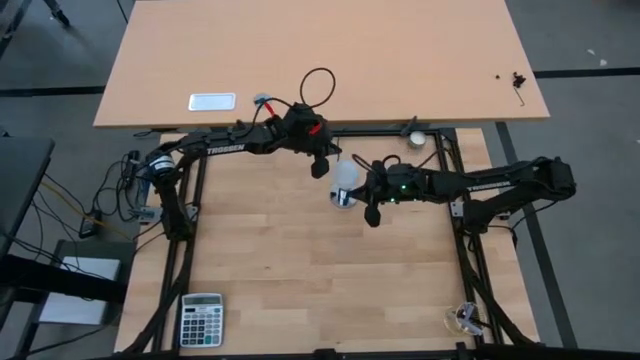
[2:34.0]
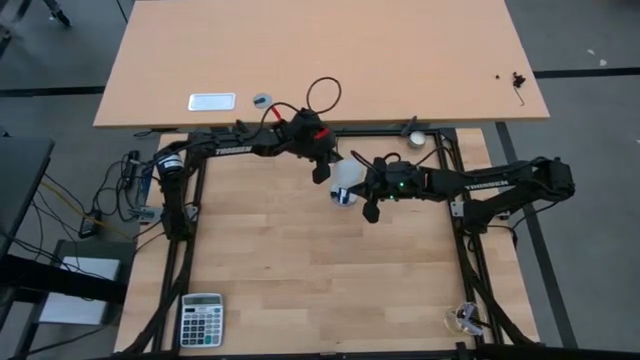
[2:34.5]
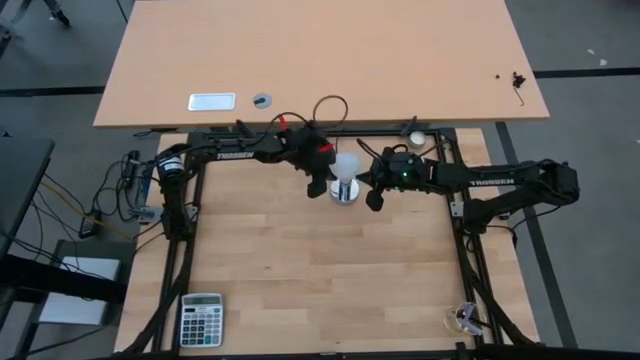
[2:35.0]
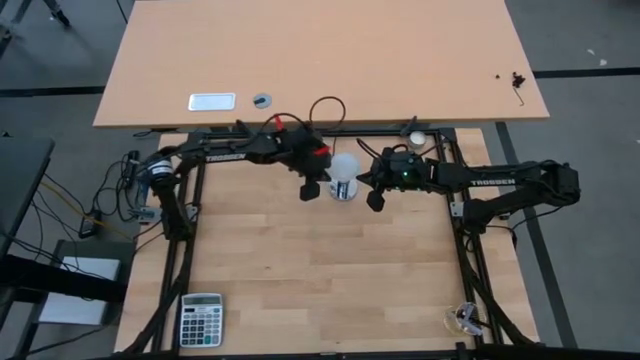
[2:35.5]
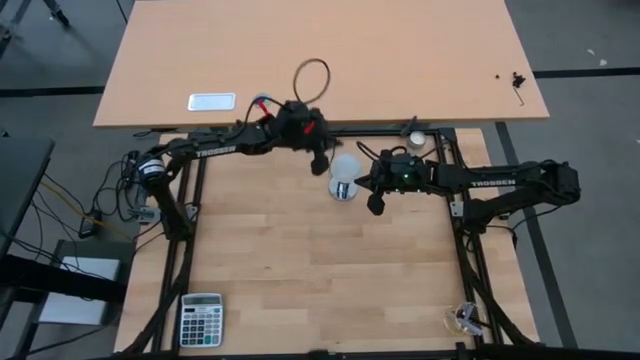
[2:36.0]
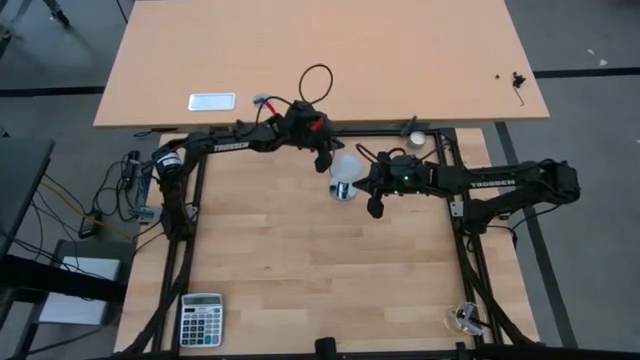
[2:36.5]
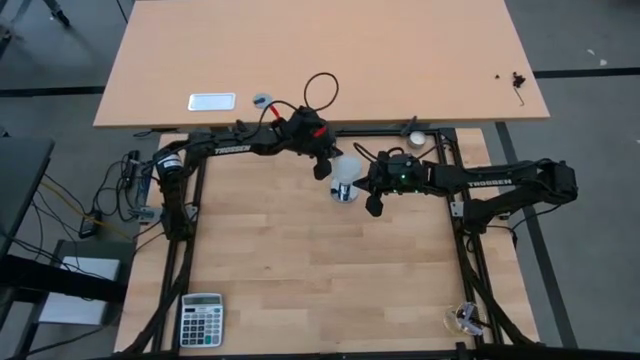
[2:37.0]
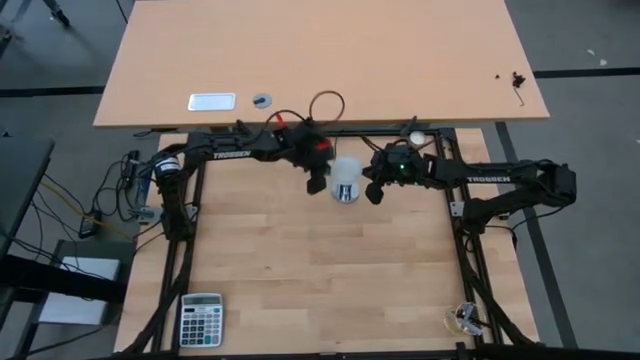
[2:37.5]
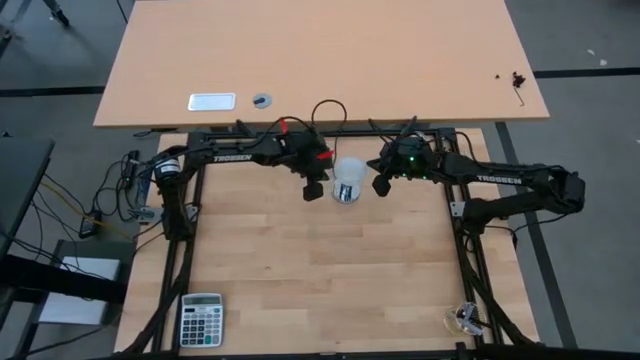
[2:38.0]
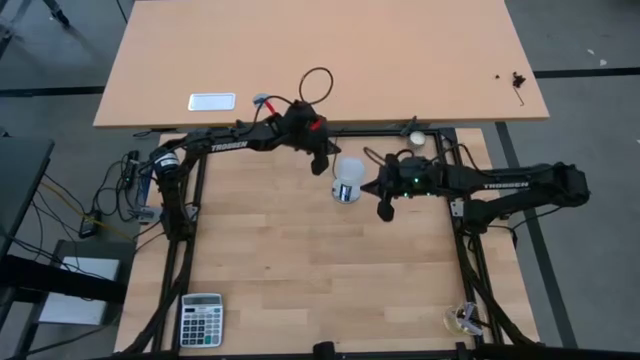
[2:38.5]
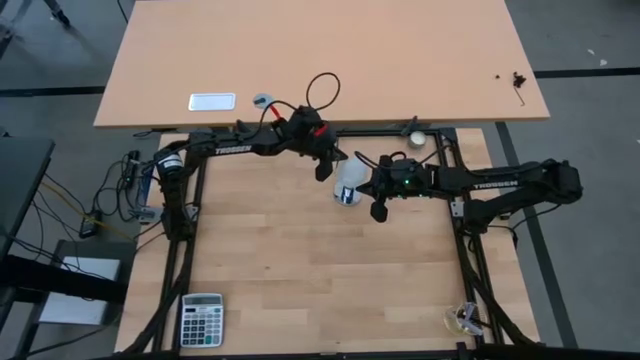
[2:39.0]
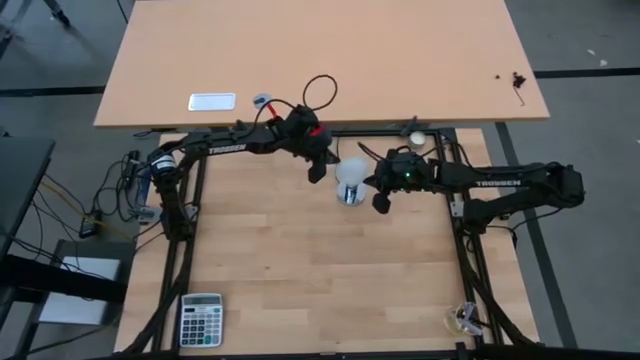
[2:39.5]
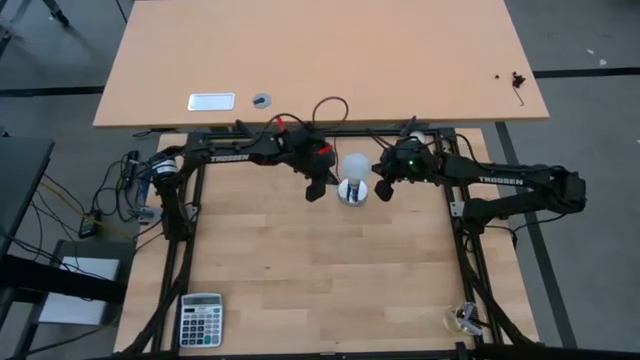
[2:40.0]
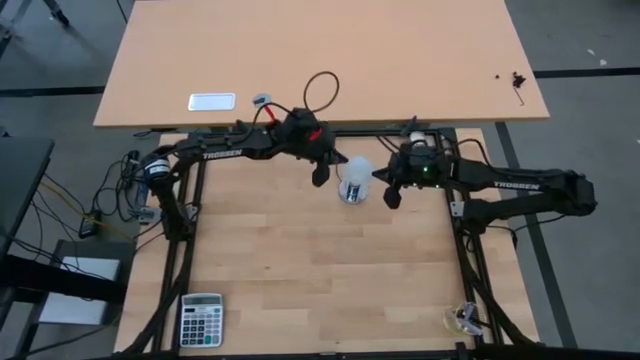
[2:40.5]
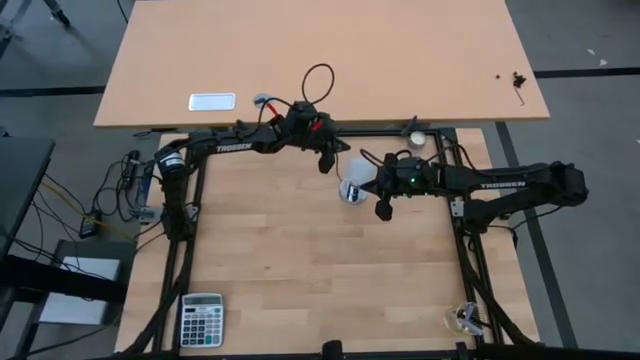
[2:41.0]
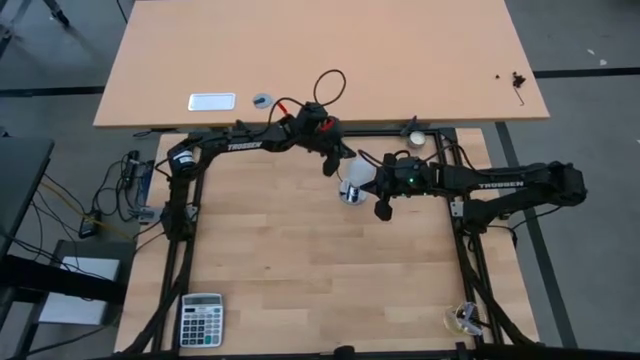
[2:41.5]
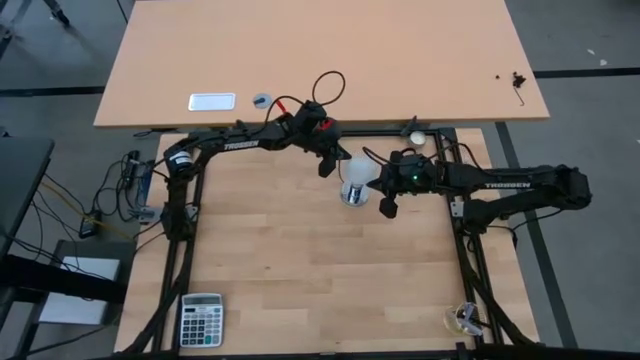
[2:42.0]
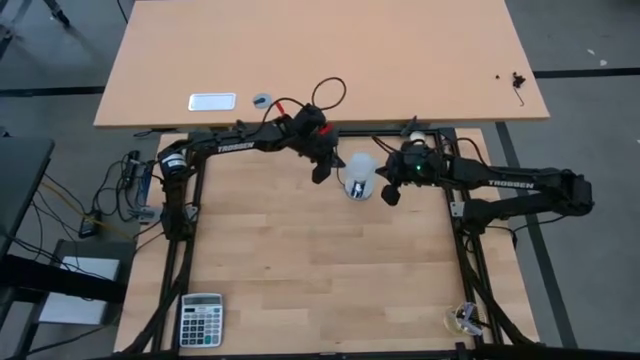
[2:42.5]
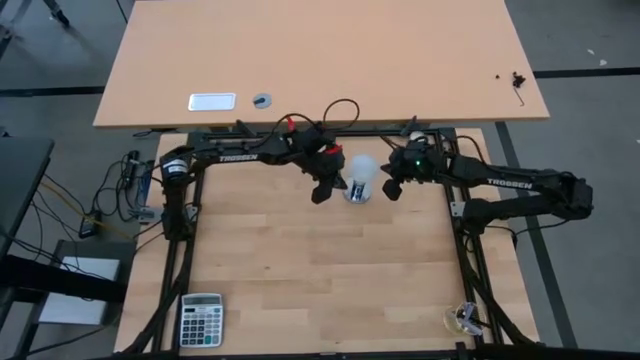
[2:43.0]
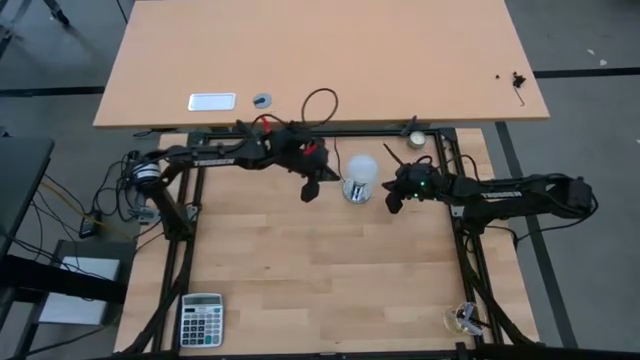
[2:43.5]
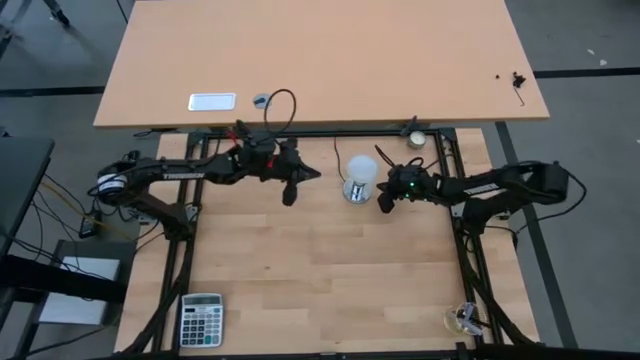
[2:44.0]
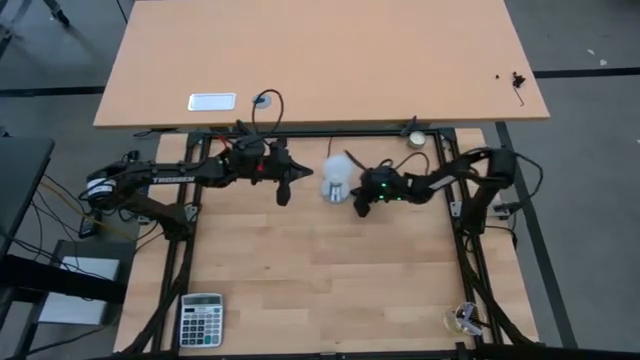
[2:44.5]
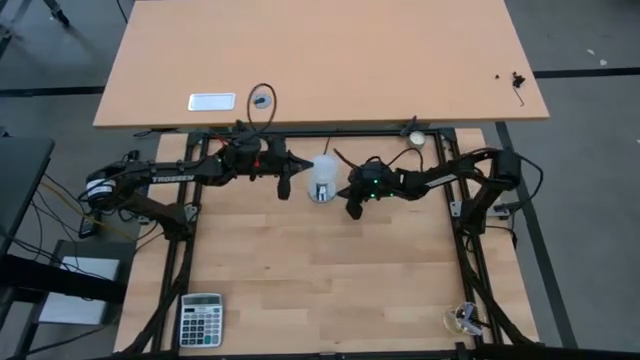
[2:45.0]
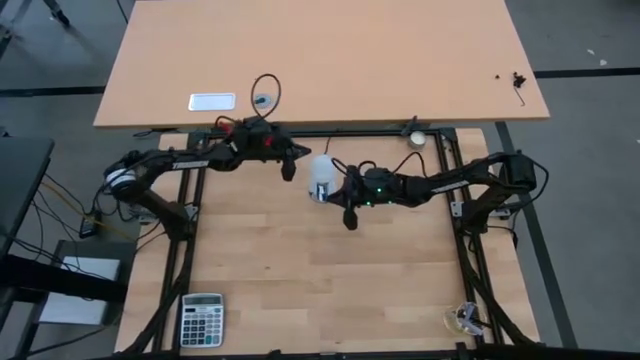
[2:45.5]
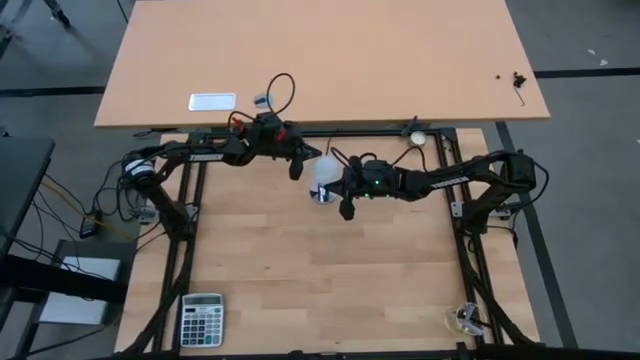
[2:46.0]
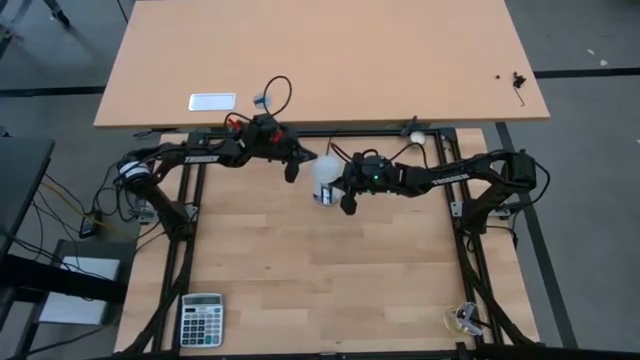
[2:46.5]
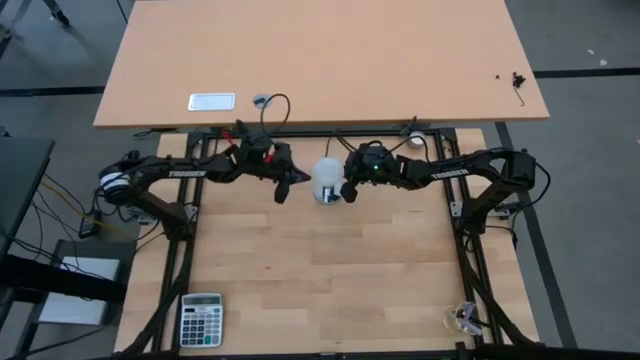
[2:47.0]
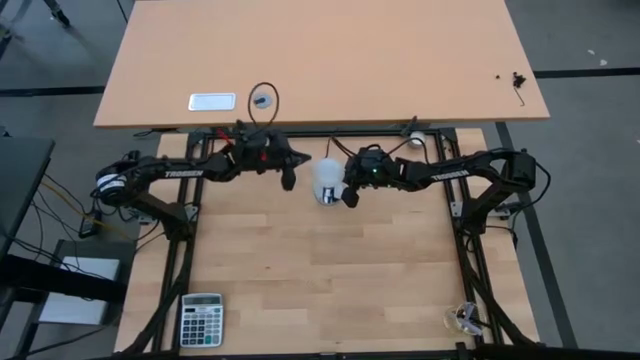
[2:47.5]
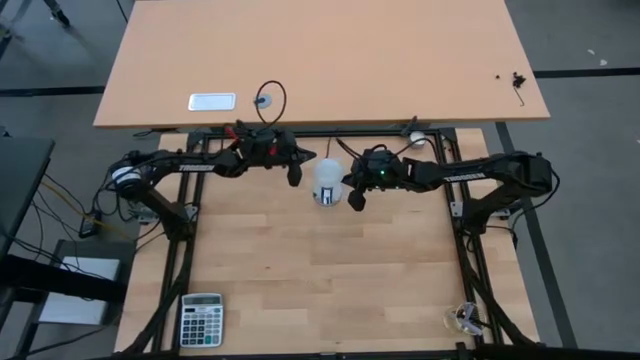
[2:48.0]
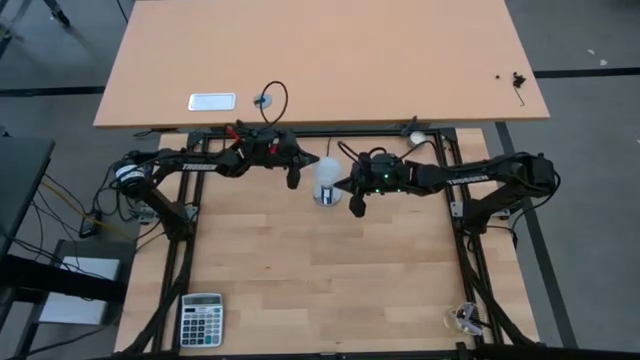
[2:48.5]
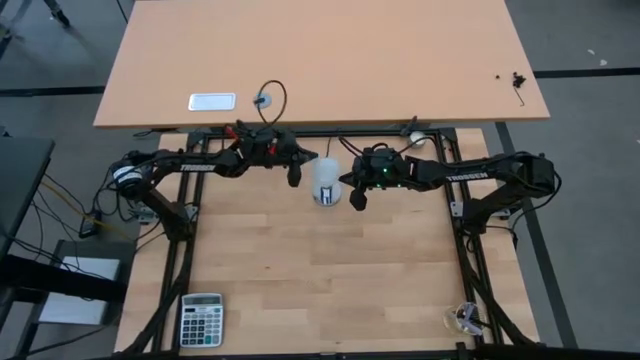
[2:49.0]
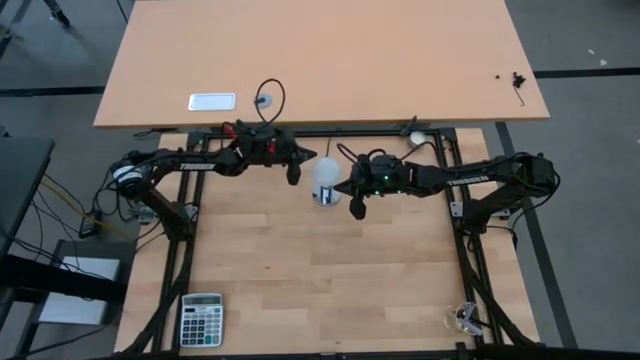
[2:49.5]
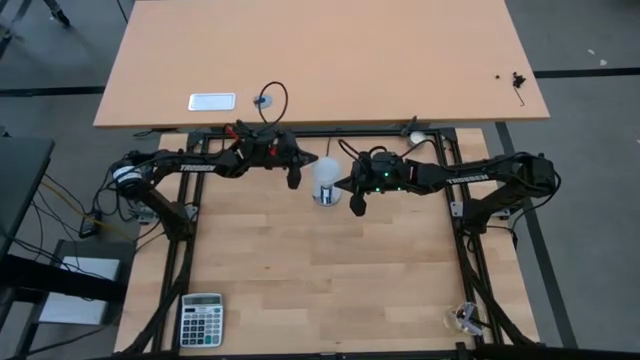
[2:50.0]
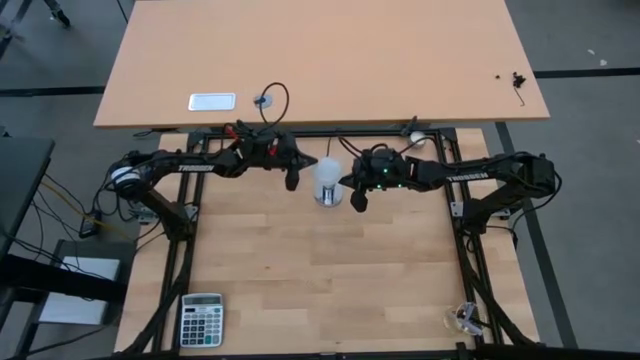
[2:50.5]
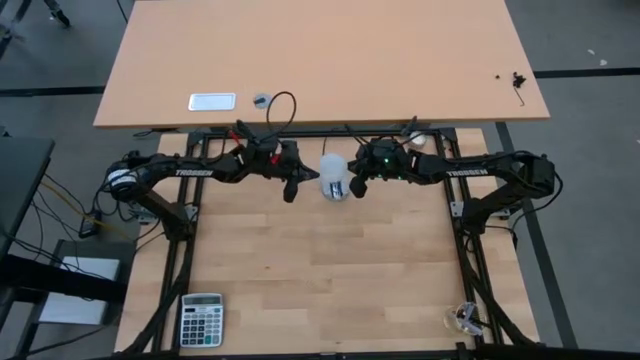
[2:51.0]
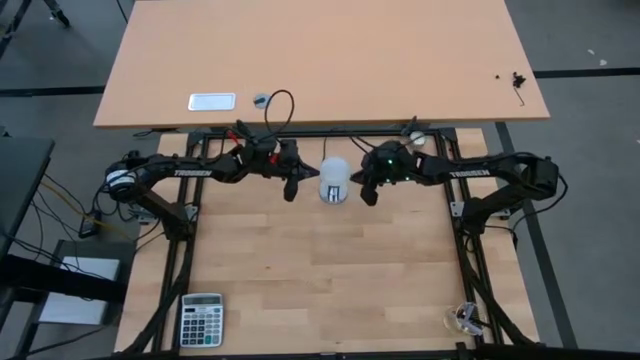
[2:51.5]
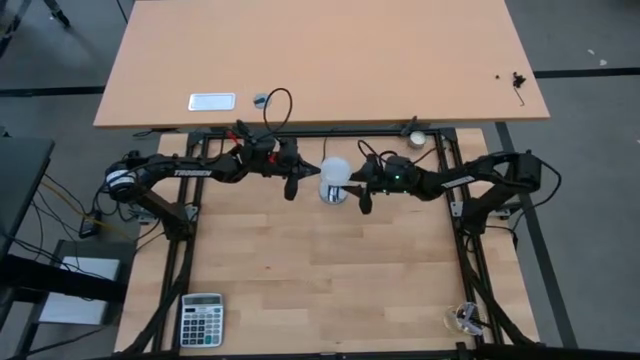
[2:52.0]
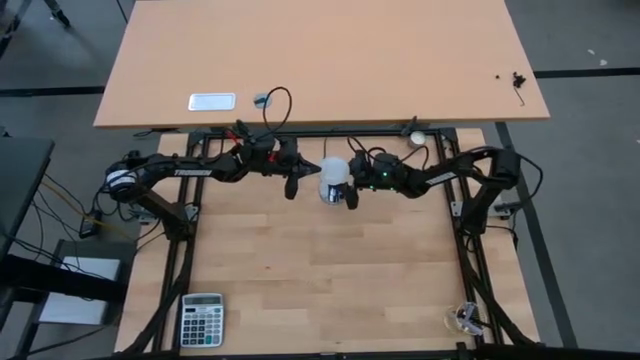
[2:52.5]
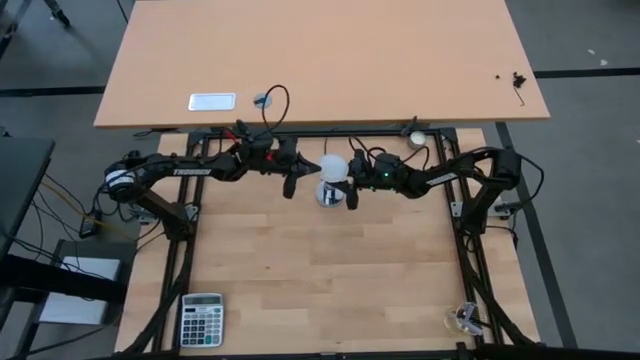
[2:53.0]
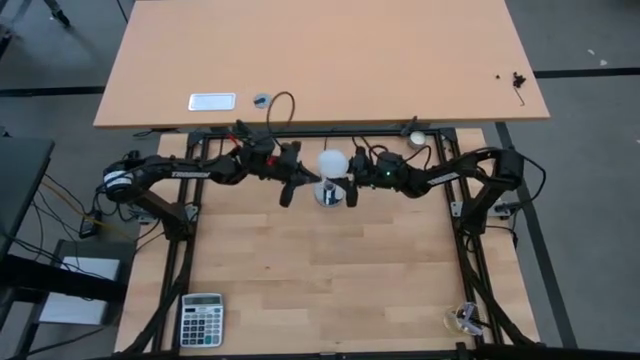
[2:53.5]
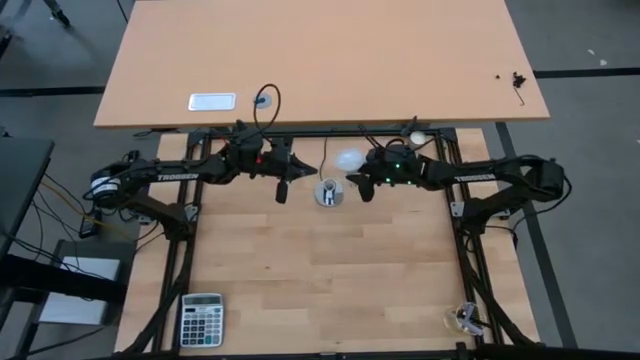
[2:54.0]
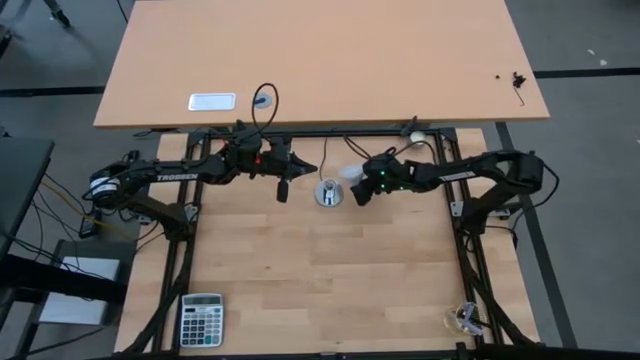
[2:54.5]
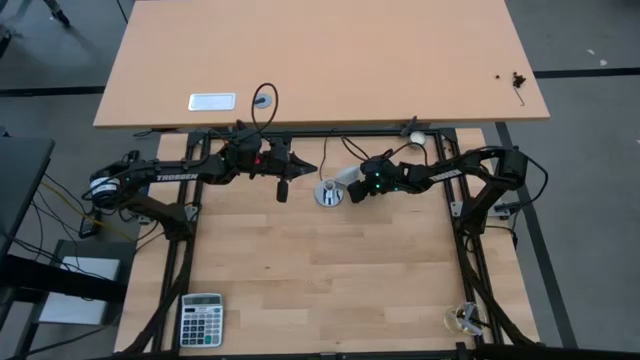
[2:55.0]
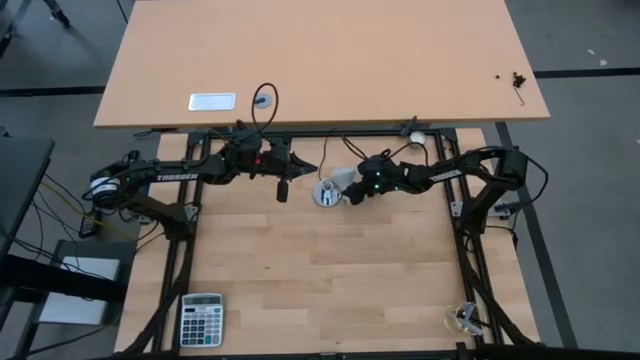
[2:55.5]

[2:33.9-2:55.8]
Task: Screw lightbulb
Remove the lightbulb from the silver lamp socket
